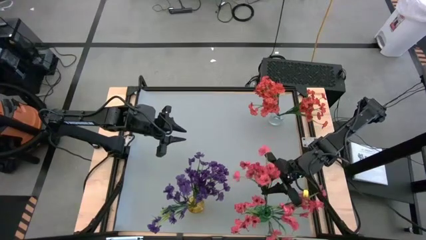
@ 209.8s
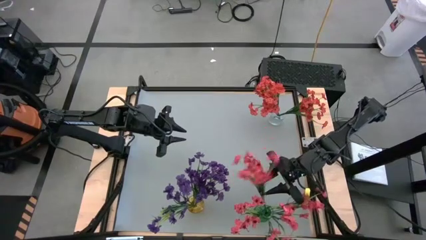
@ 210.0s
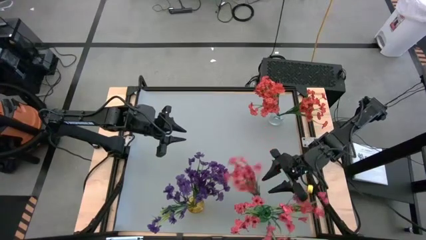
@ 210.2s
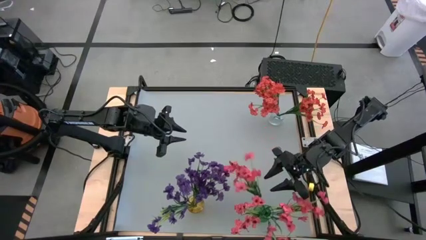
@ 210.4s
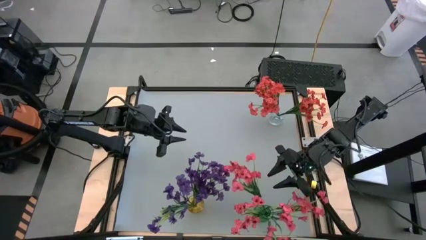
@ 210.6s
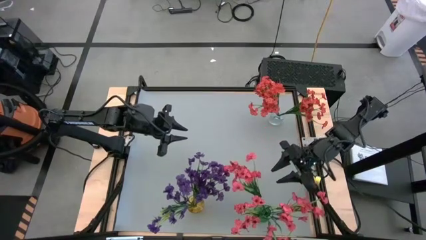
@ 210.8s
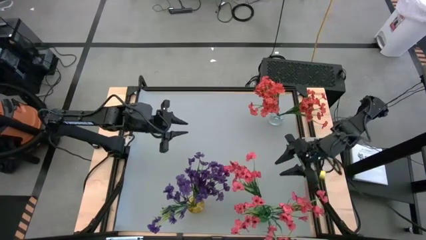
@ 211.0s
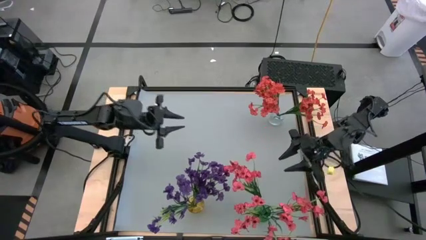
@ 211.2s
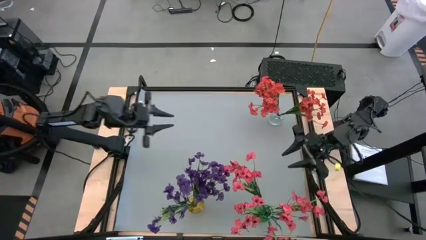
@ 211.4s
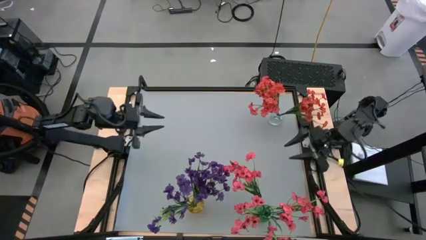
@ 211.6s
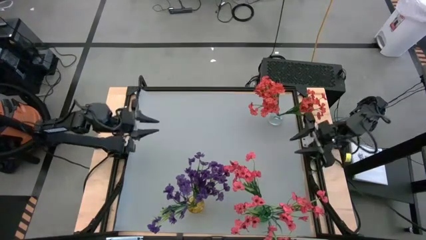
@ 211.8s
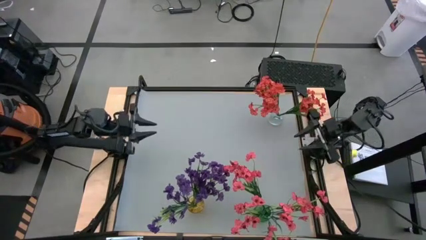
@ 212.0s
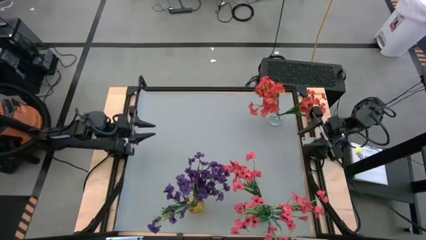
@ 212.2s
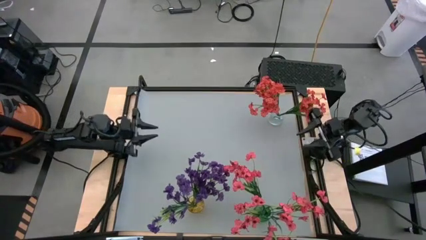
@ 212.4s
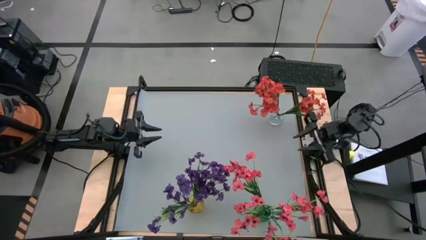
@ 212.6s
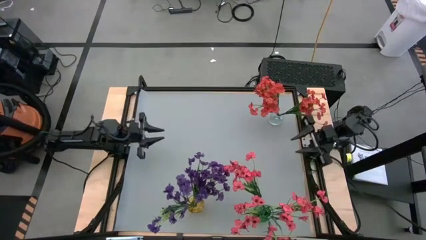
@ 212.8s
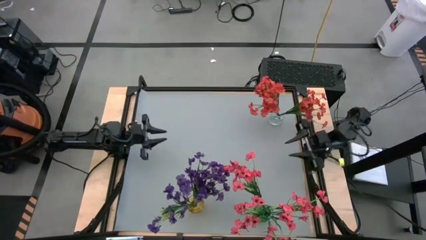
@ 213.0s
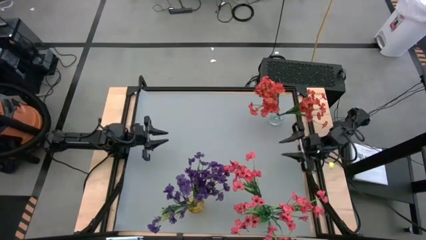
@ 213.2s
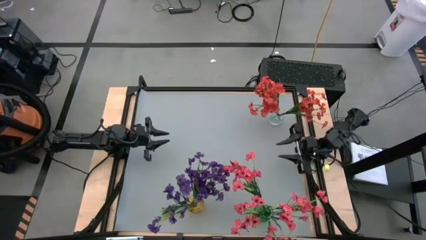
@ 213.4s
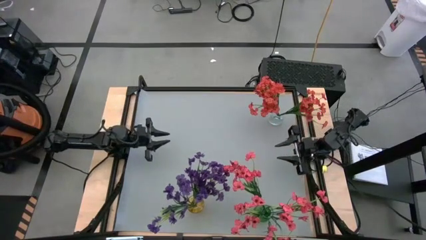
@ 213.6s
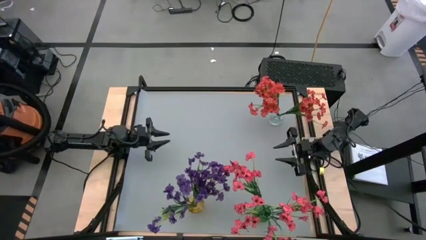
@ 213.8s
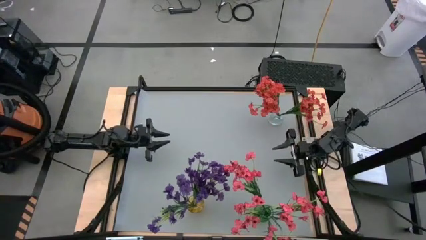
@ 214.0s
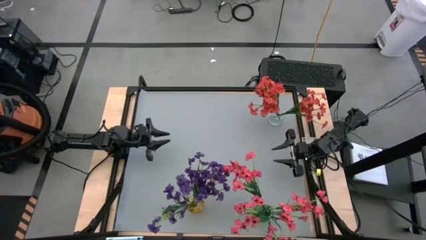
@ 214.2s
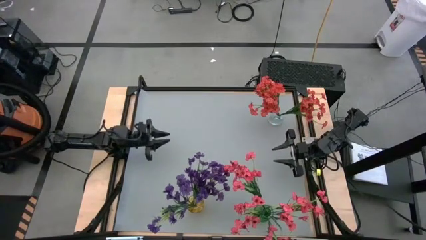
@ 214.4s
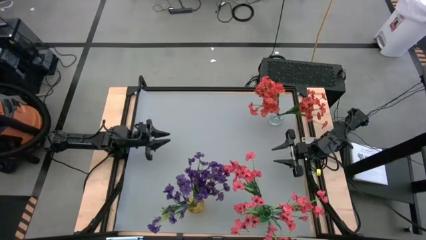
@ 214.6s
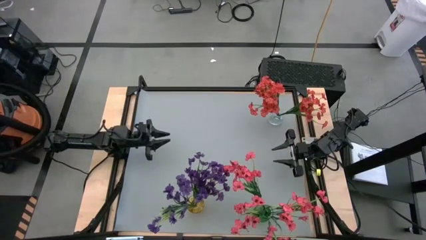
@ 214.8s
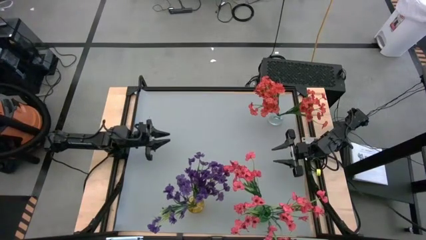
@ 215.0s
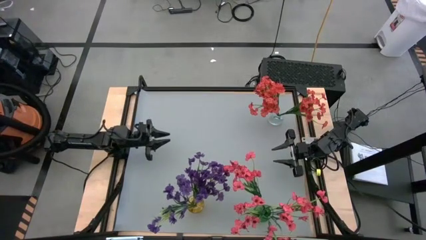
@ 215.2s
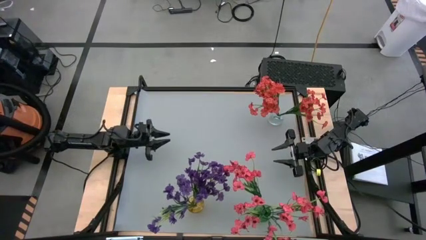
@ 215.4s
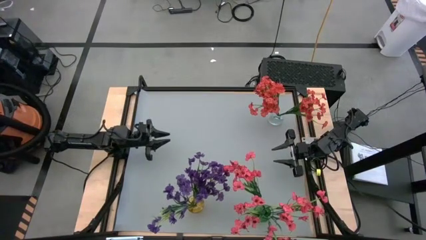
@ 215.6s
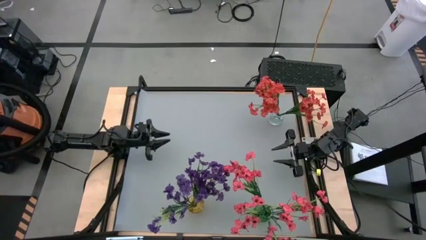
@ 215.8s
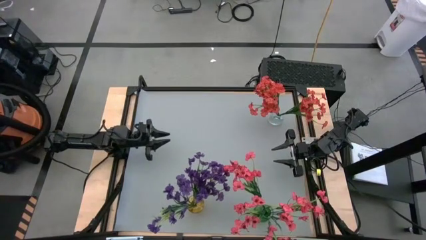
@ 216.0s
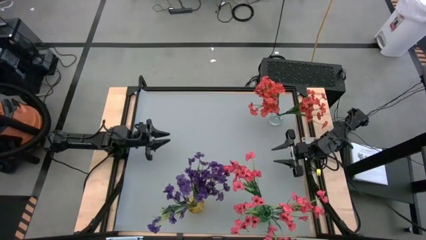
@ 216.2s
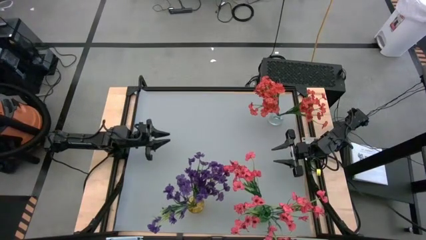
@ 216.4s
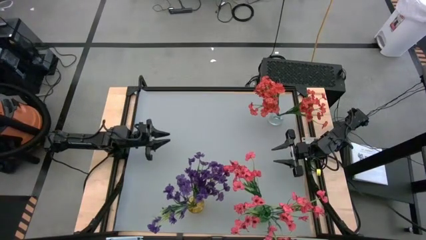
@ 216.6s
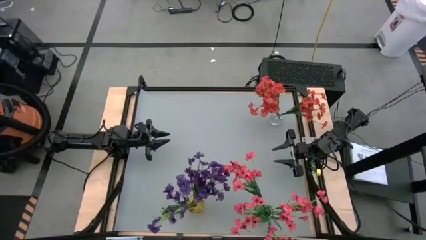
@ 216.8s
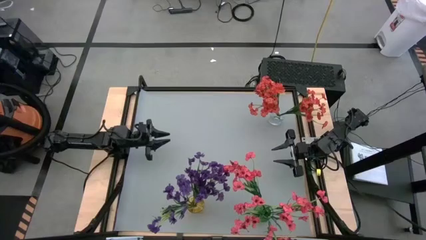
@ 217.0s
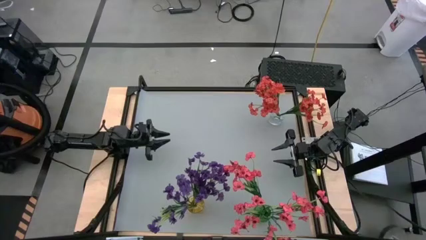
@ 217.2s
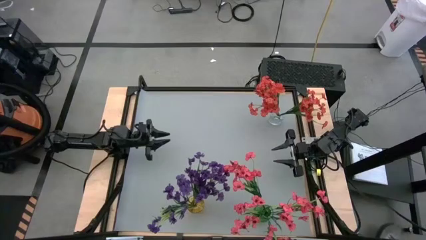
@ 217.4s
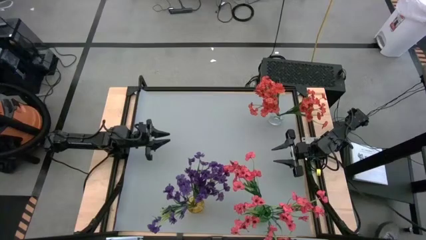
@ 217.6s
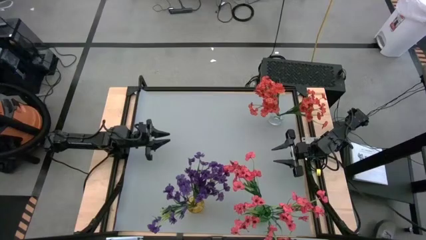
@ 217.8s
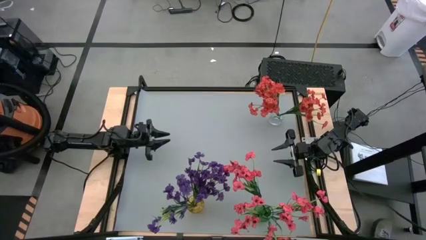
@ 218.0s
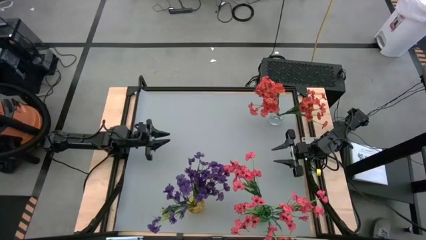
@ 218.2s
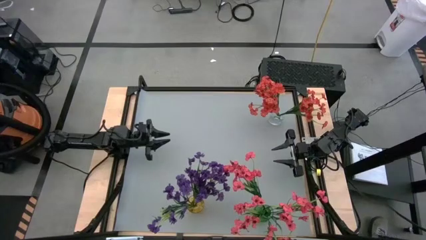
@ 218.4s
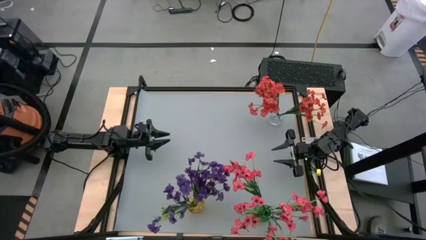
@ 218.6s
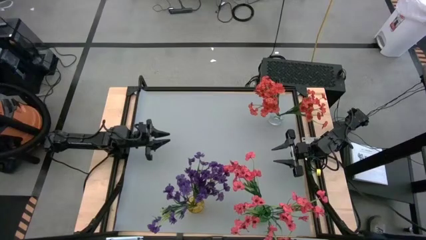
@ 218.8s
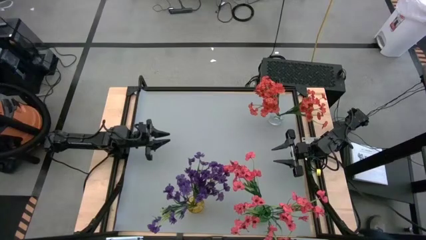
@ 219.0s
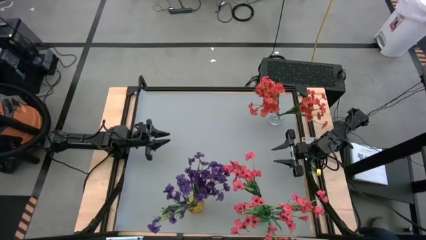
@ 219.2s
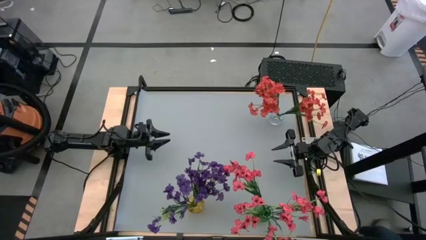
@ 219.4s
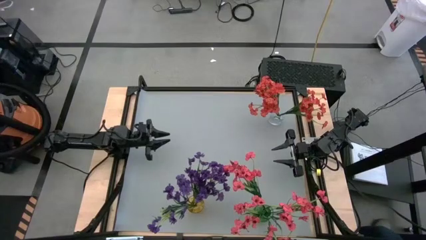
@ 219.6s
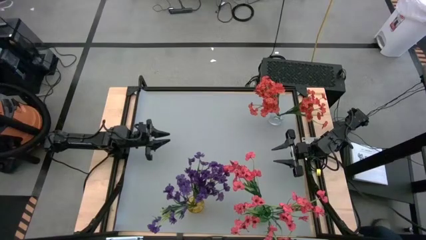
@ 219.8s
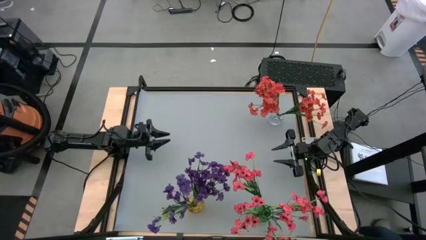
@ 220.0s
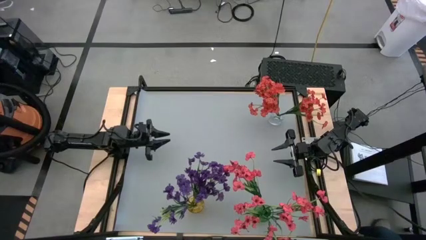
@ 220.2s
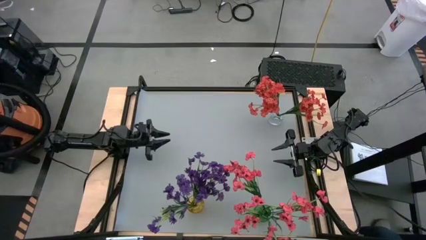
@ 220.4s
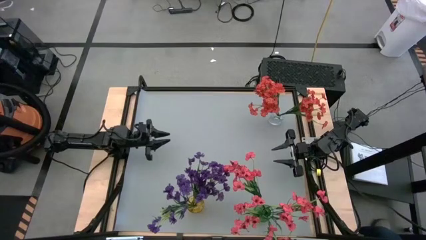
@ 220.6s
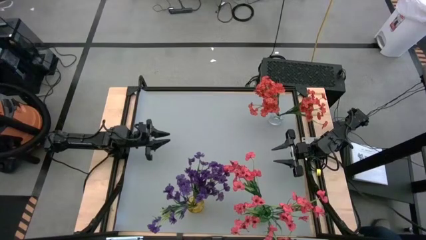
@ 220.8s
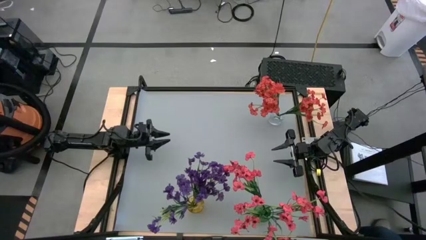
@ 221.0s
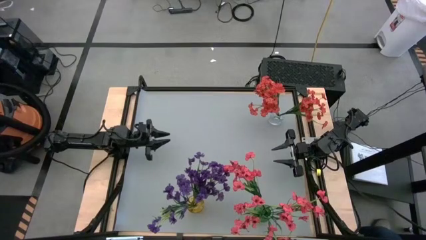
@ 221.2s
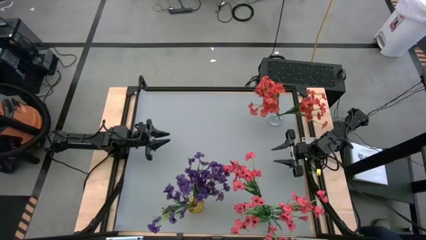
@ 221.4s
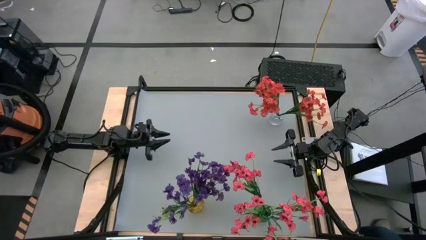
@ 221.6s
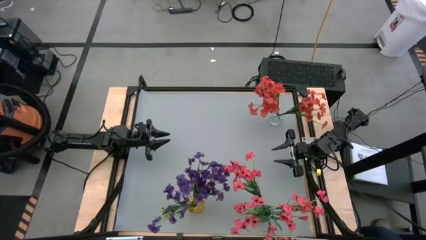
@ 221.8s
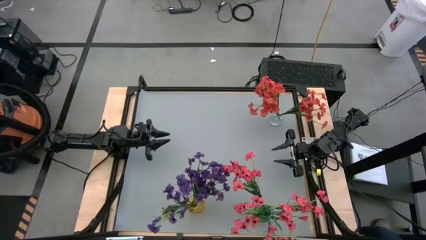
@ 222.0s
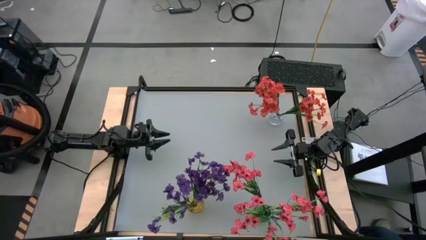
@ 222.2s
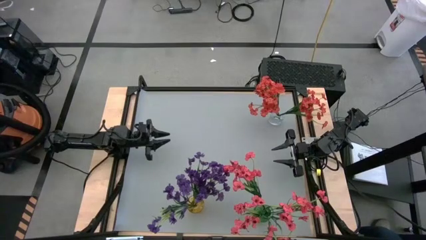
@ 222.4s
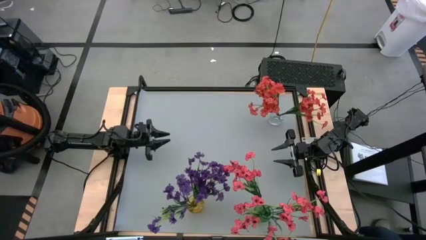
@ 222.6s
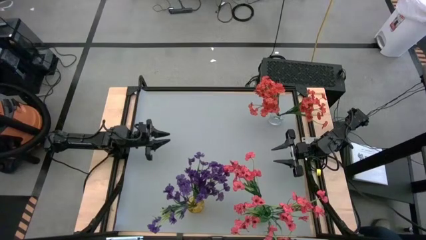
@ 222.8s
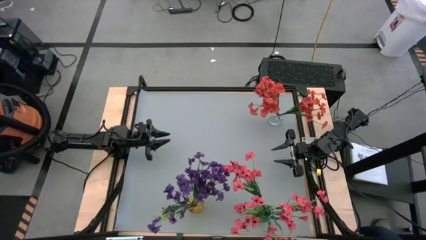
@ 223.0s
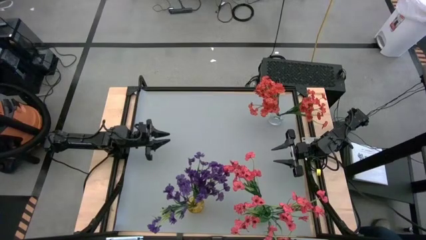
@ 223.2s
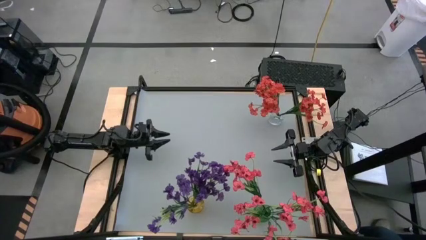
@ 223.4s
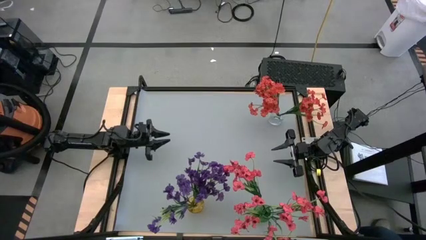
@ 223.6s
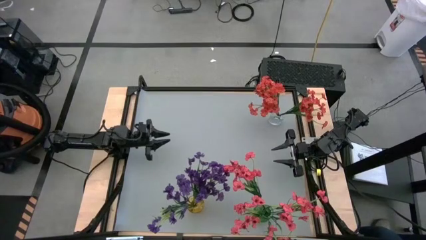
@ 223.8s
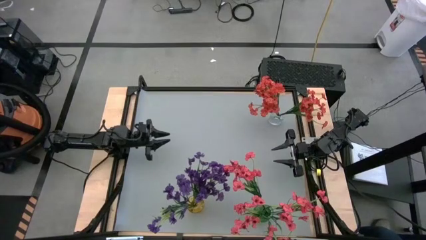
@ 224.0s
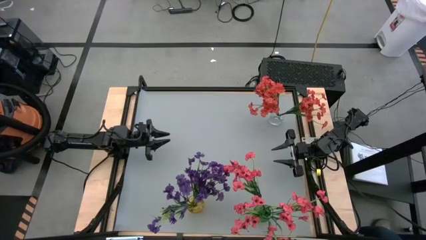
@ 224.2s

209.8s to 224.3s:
Task: Sort flowers into vase by color
Return to Home Position

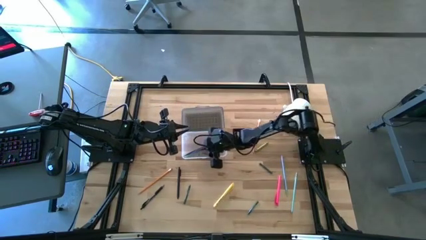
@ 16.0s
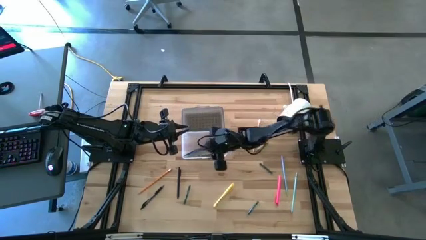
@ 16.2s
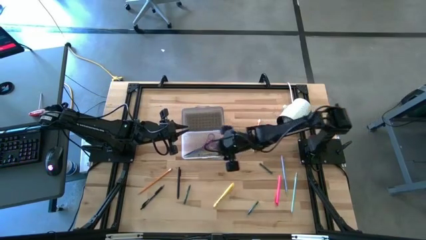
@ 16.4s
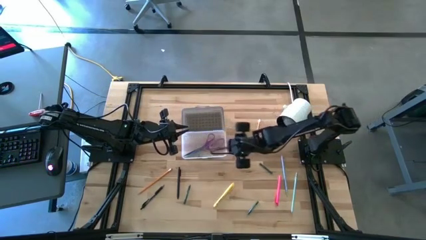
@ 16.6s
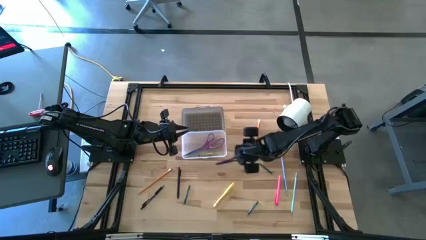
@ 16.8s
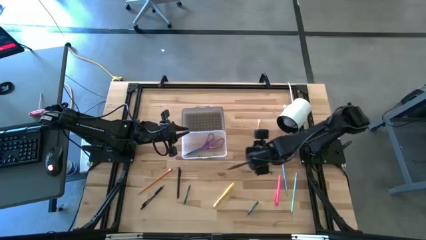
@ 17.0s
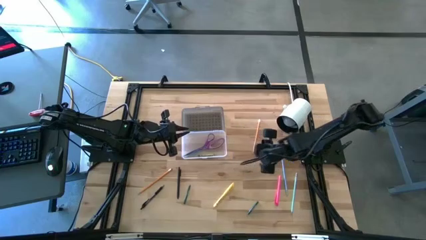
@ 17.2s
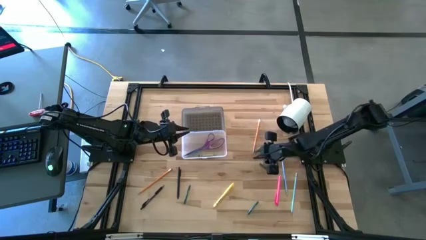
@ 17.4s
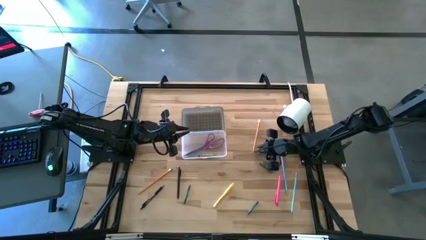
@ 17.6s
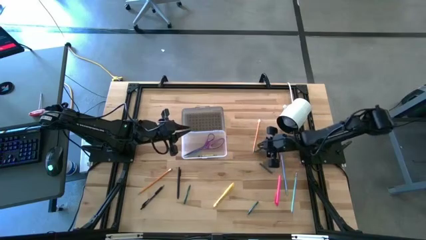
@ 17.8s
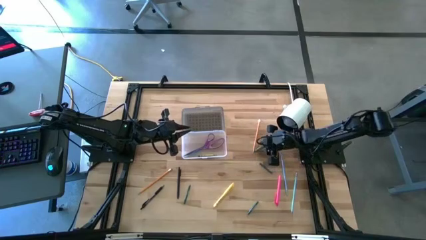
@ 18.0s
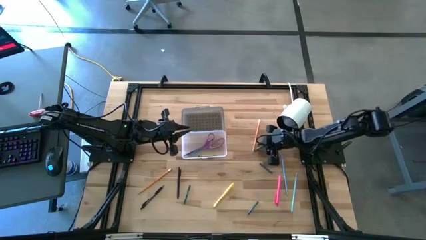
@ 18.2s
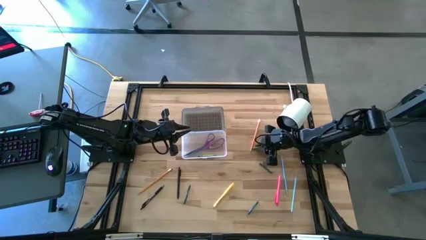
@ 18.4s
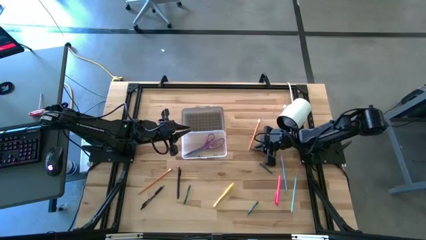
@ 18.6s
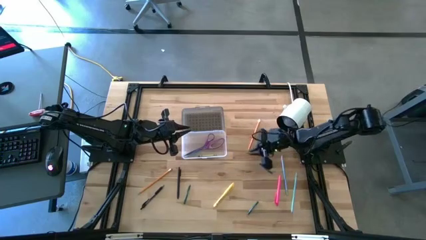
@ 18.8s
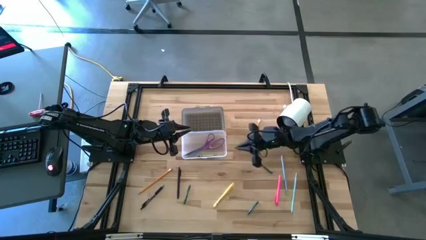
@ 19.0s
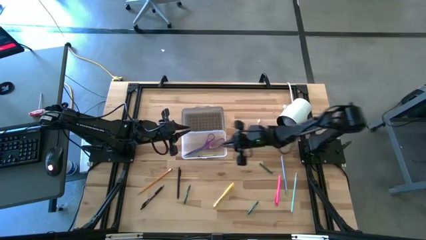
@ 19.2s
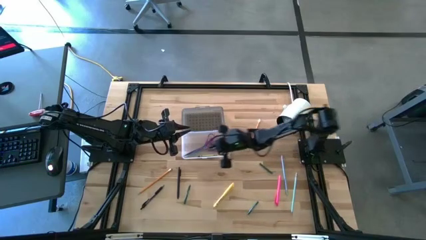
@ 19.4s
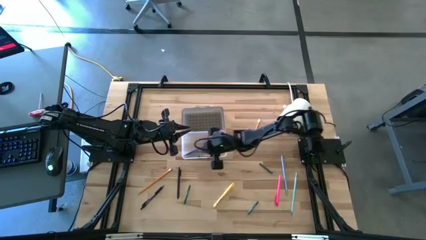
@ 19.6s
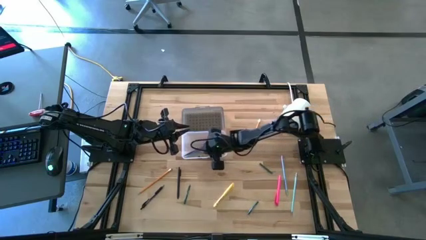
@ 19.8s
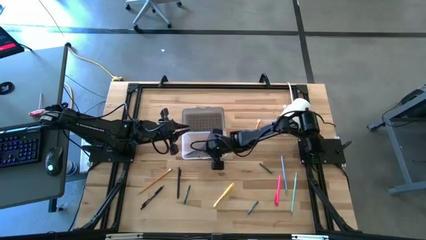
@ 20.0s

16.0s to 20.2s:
Task: Pick & place school supplies into a supply box
Put the green crayon into the black box
